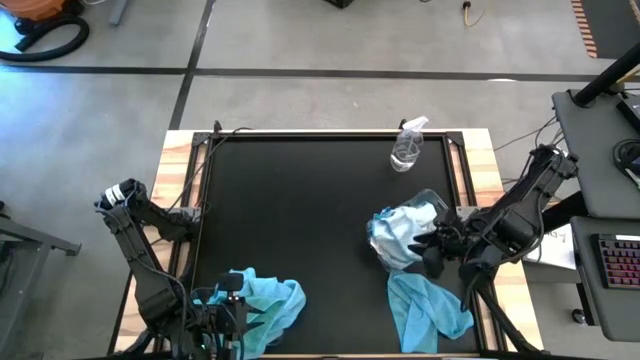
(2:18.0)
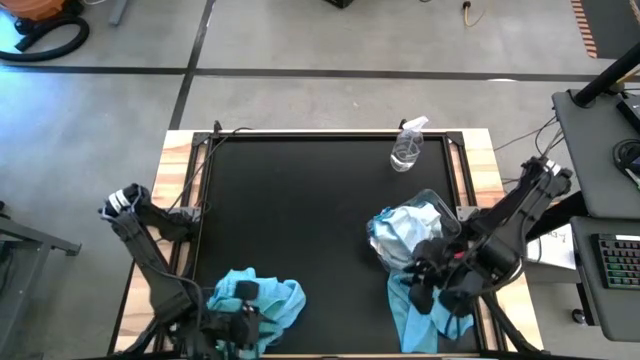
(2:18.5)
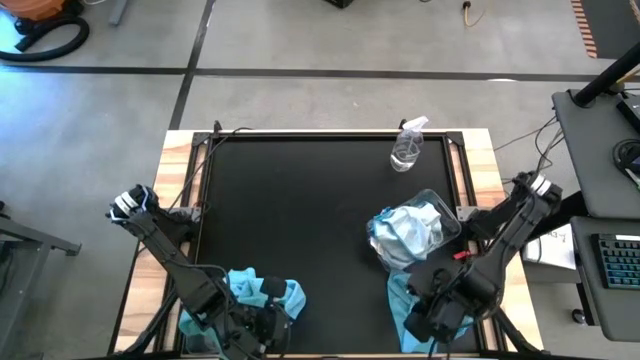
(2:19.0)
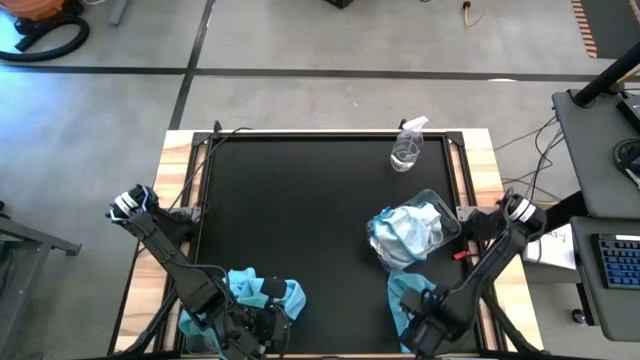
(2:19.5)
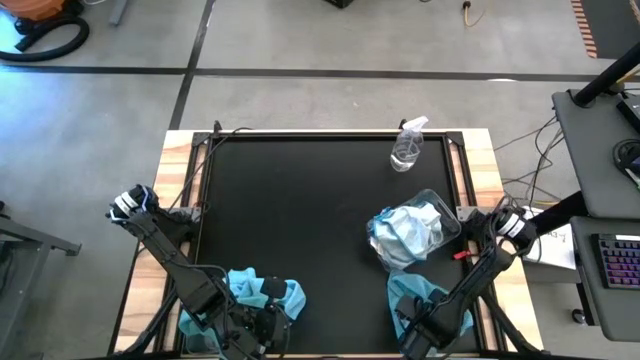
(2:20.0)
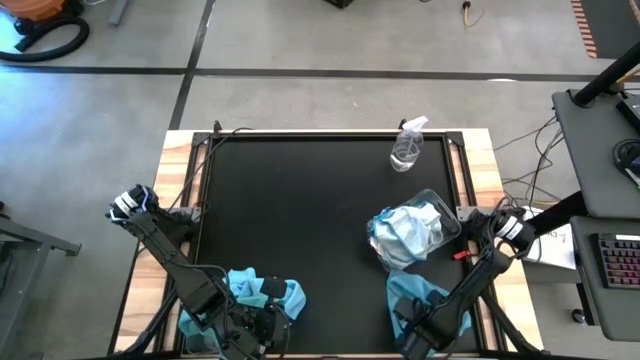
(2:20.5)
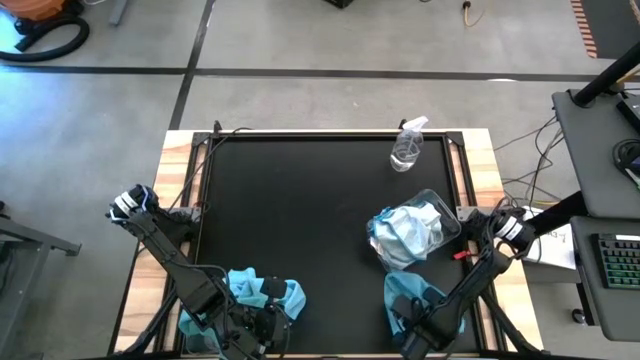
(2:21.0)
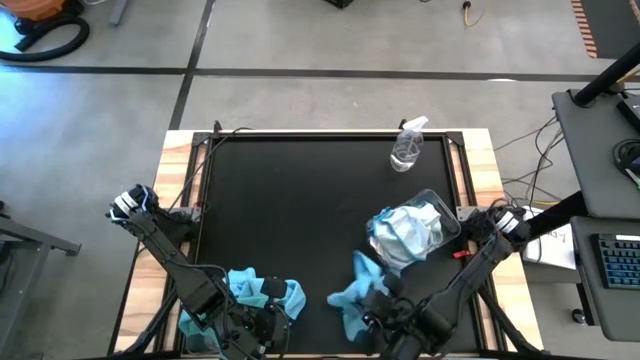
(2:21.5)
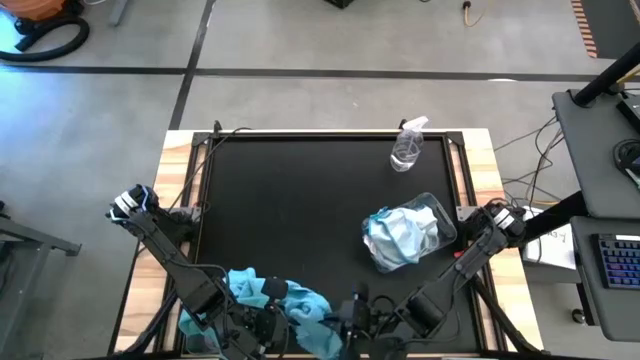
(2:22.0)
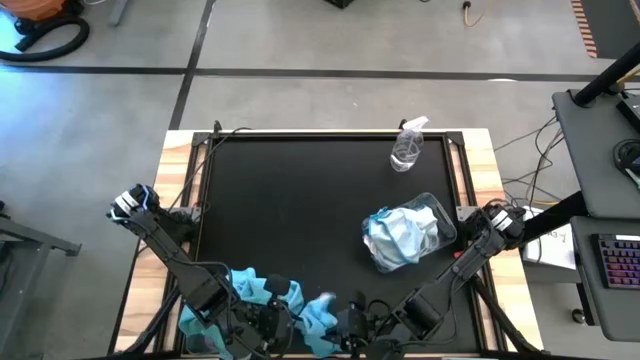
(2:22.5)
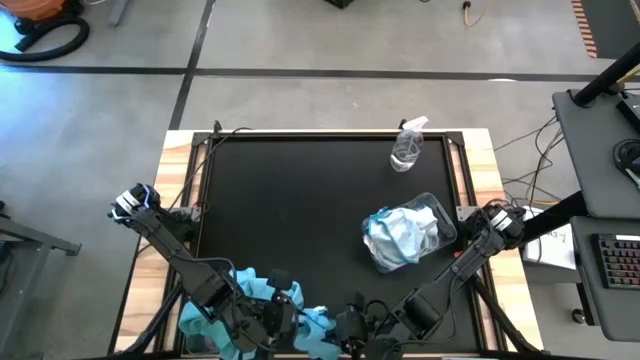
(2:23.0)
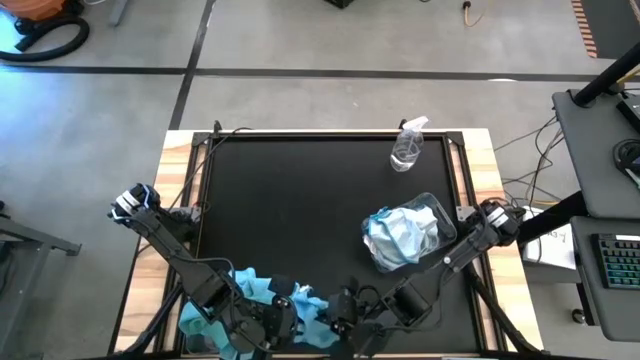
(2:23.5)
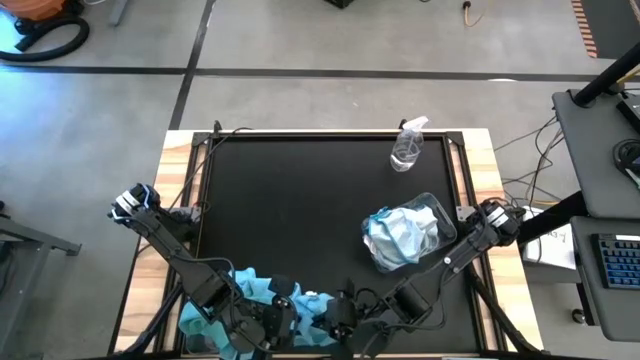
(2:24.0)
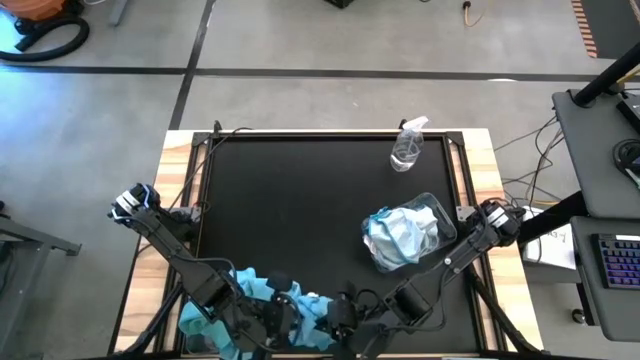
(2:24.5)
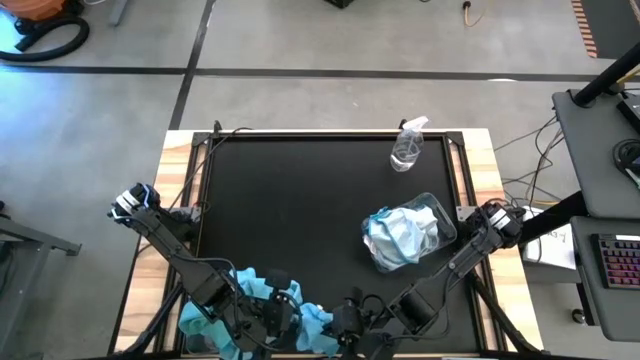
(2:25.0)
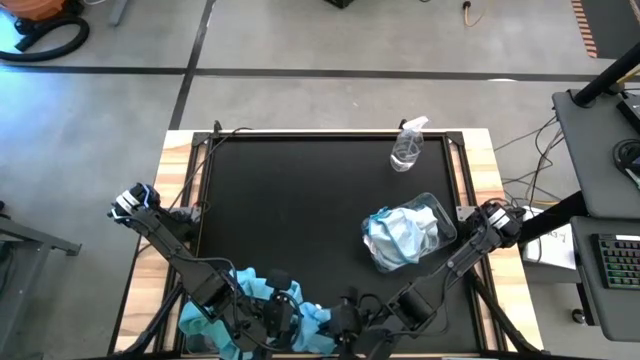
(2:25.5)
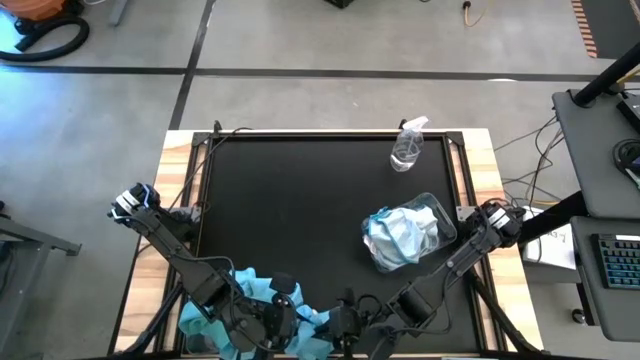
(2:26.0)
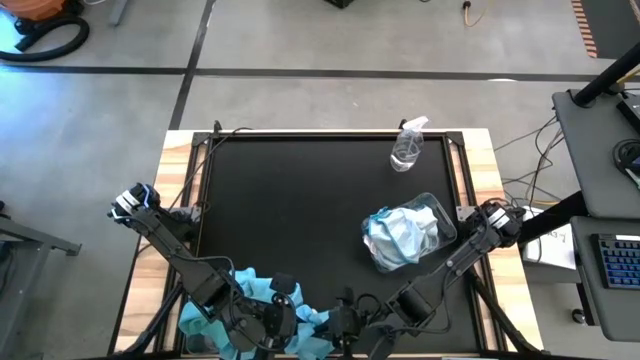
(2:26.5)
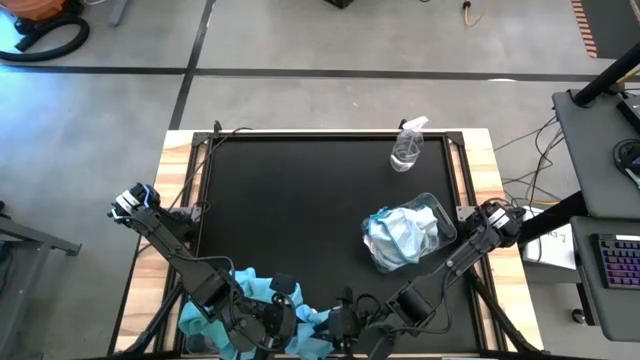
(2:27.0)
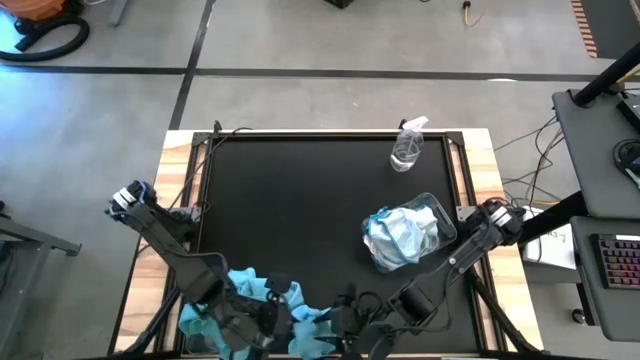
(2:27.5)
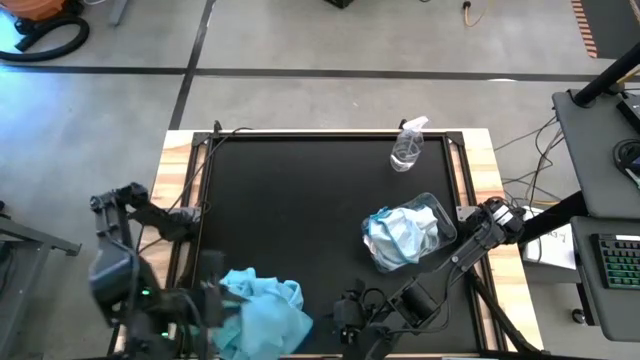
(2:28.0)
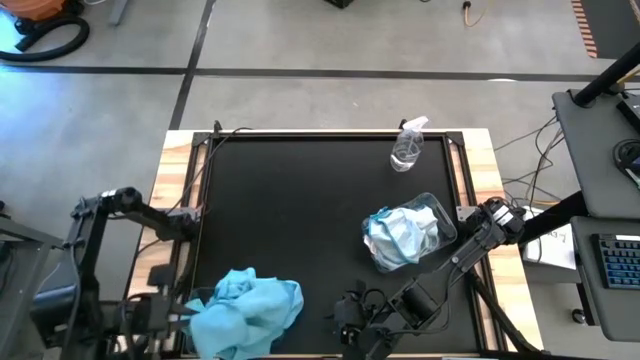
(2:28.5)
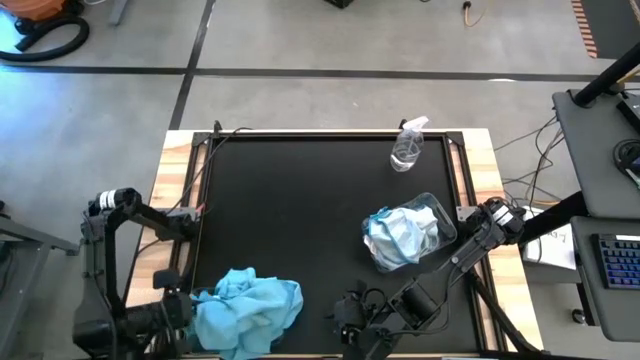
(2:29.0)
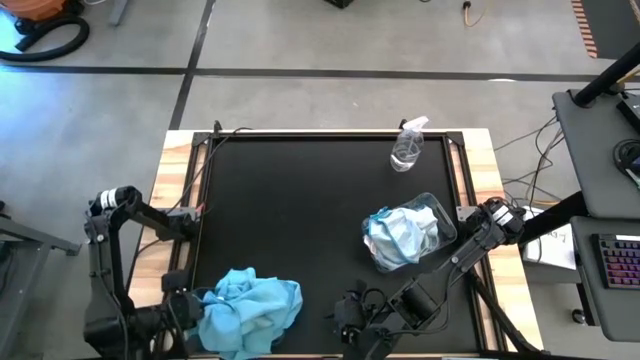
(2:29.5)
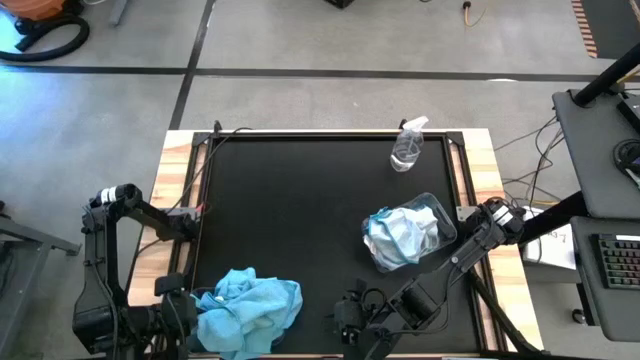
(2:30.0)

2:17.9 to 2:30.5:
Task: Sort microfiber towel by color & place in baskets
Put the blue towel into the bottom transparent bin

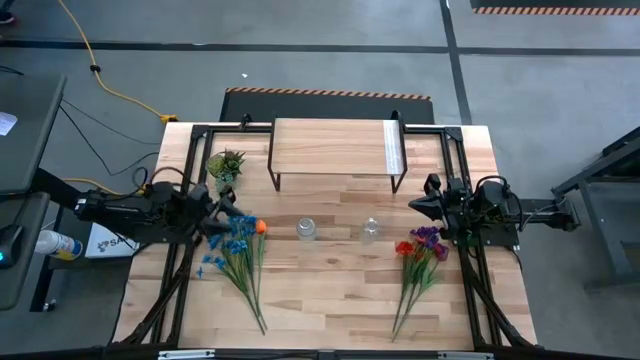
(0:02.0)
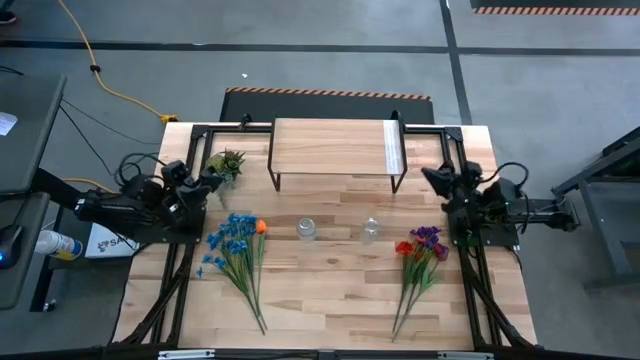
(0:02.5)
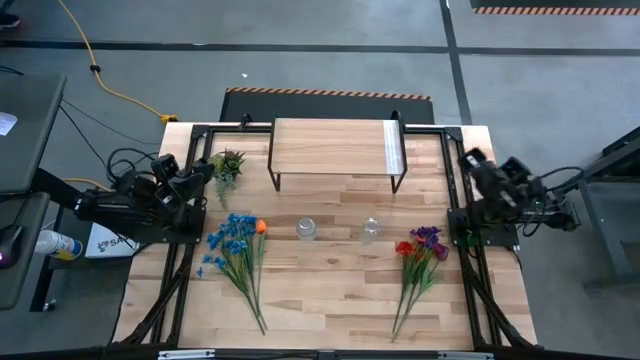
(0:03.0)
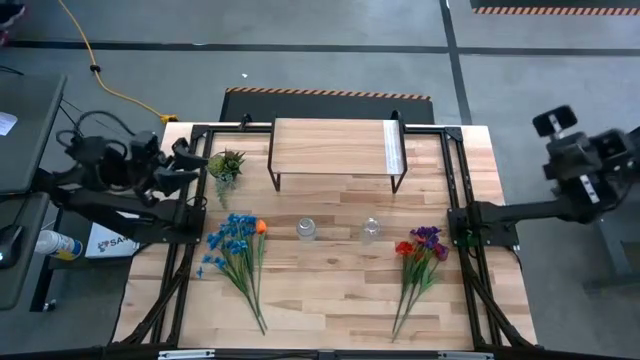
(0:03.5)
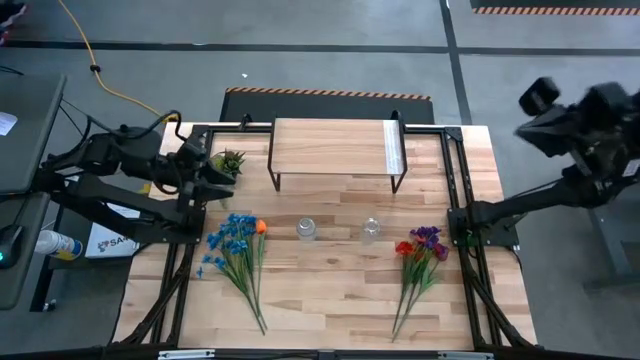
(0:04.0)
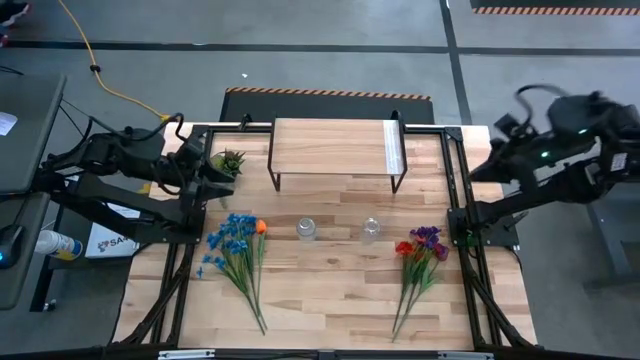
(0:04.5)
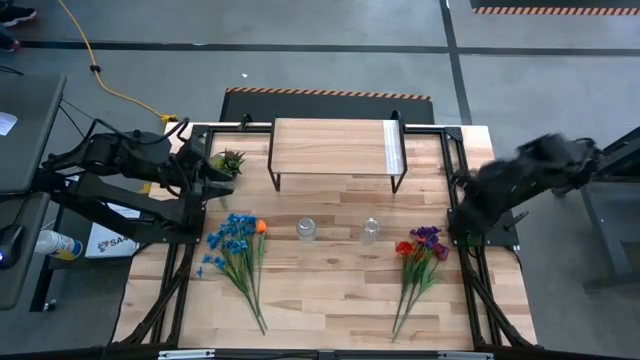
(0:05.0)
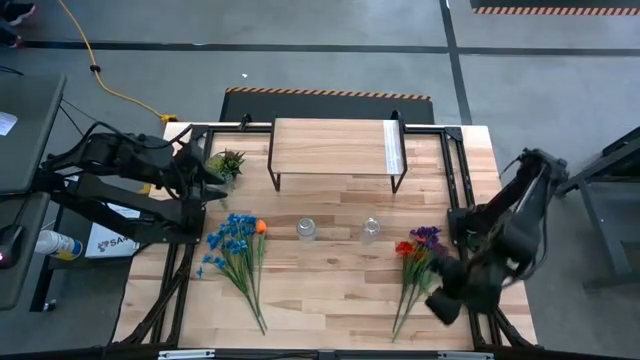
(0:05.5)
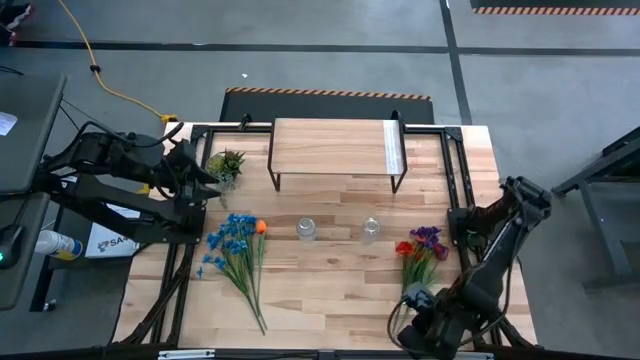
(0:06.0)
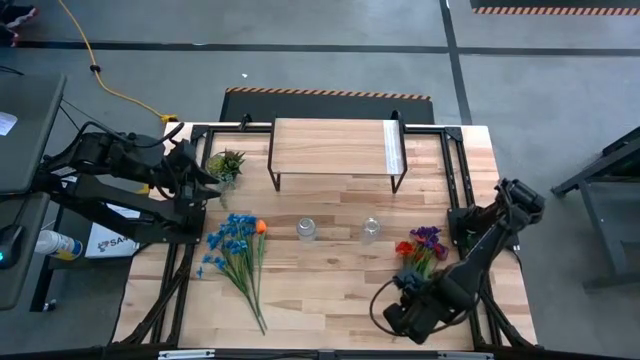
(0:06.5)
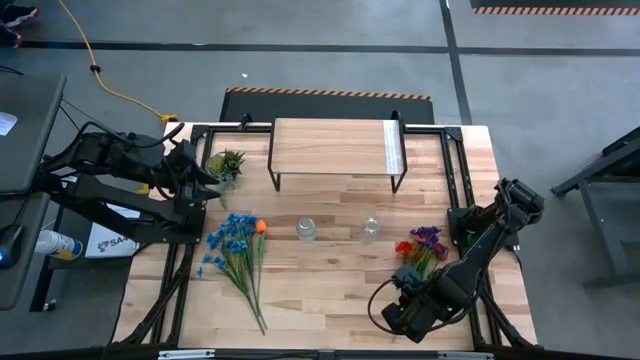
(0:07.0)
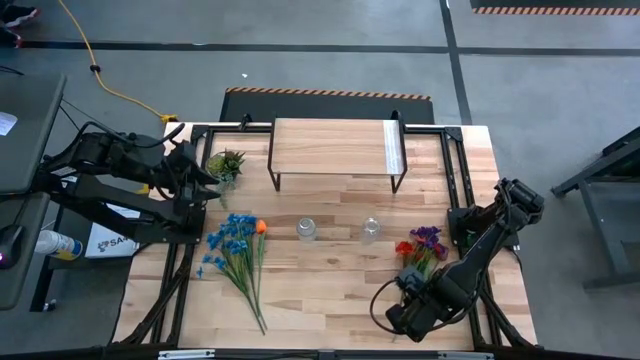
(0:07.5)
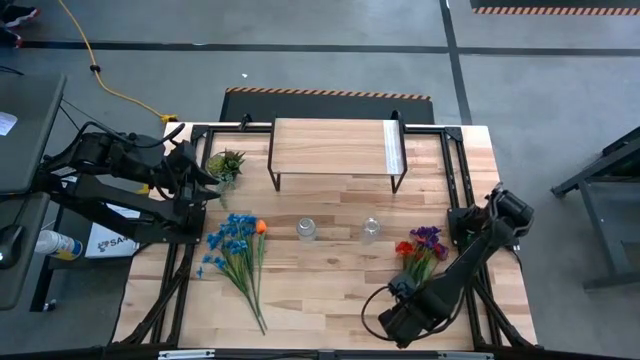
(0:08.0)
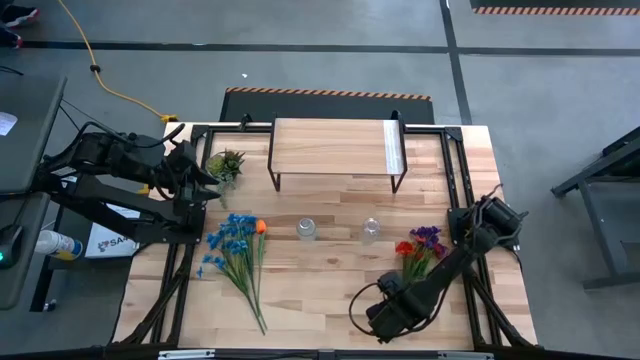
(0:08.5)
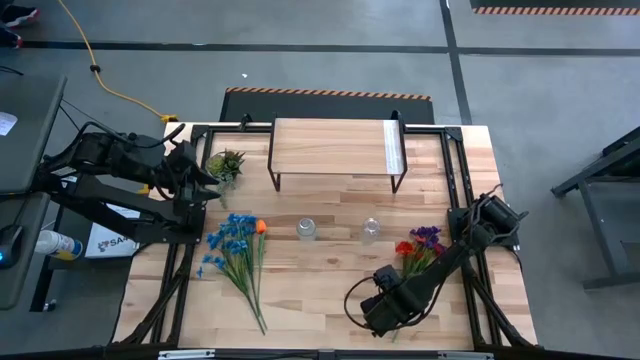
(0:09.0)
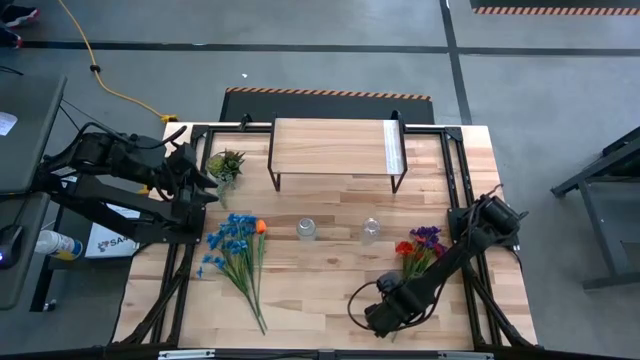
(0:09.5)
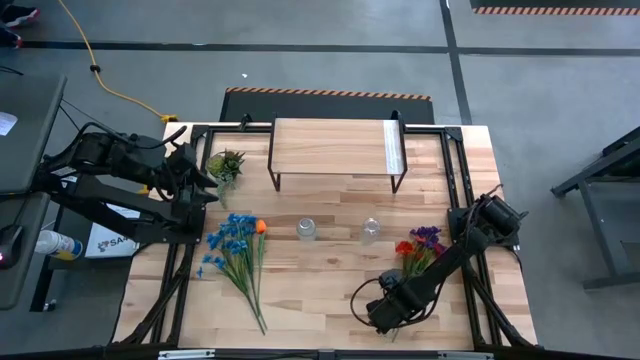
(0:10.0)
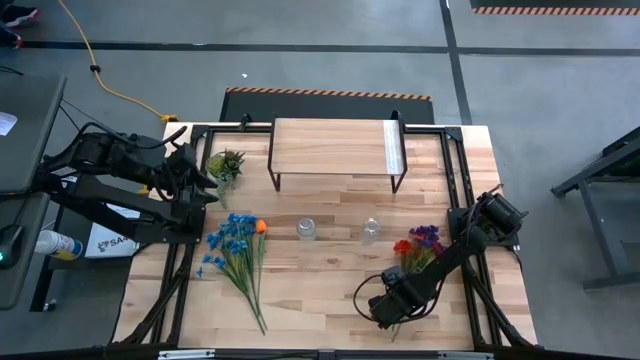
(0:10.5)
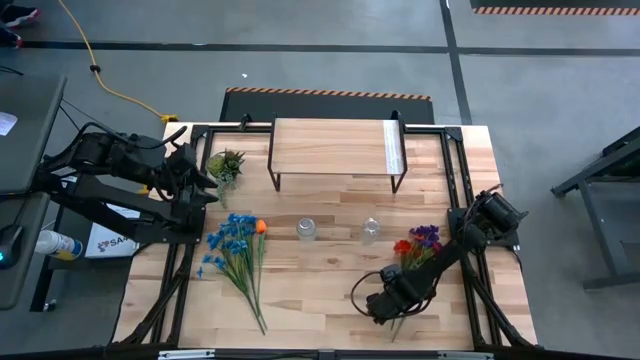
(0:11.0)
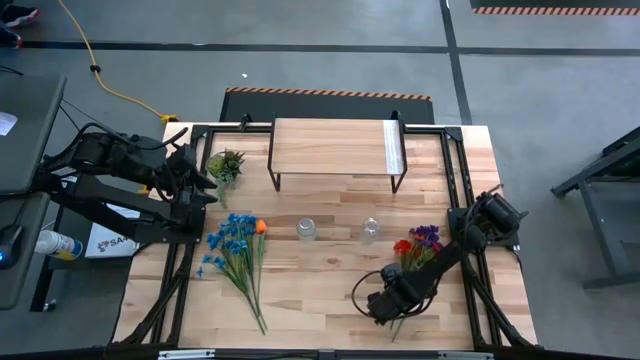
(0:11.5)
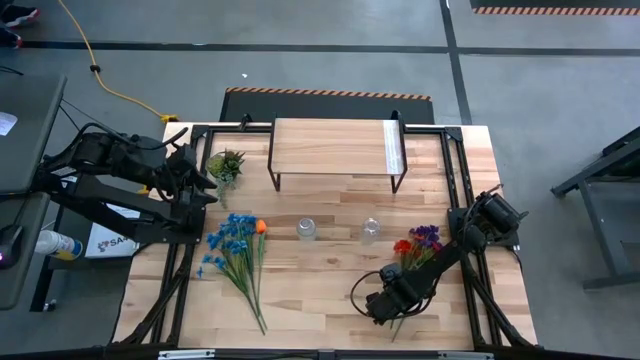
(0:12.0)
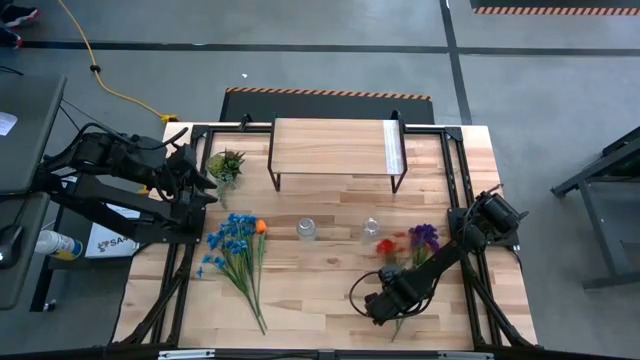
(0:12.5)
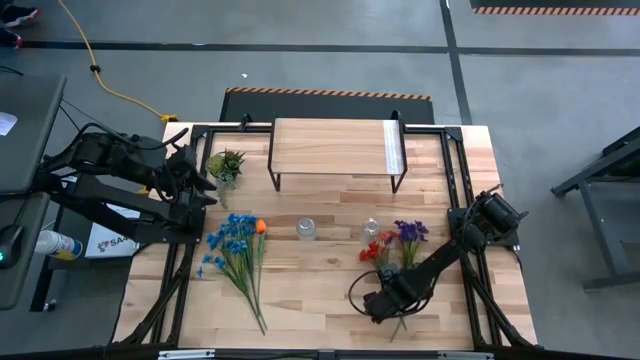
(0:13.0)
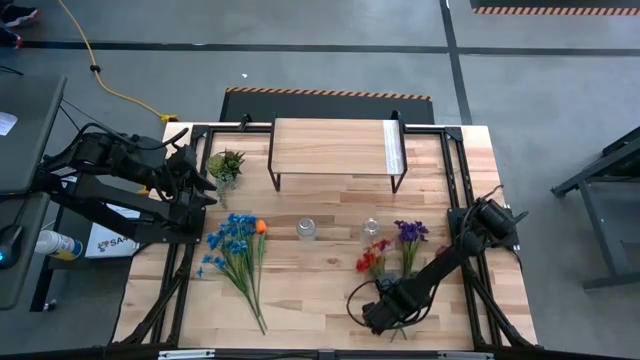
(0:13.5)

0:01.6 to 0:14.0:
Task: Pick and place flowers into a vace then onto a shelf
Put the orange flowers into the right transparent flower vase
